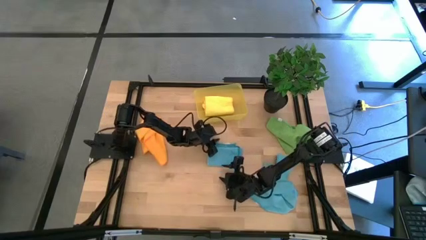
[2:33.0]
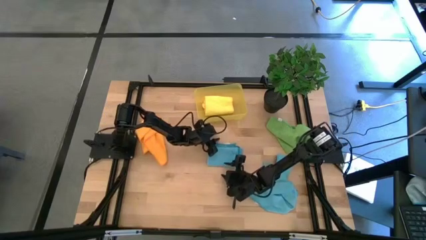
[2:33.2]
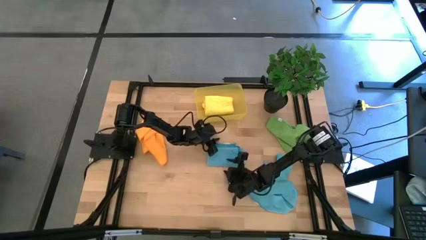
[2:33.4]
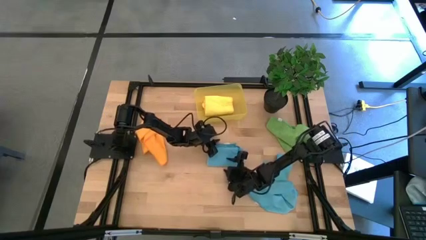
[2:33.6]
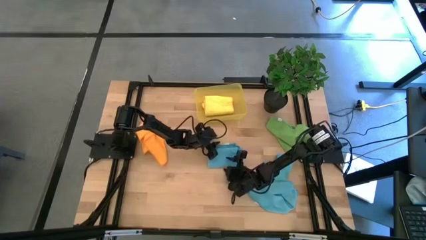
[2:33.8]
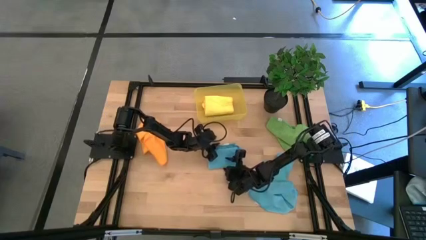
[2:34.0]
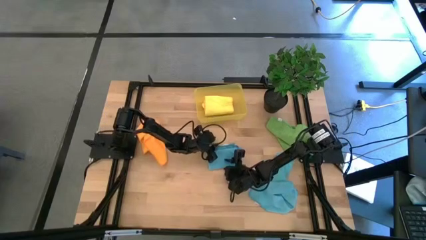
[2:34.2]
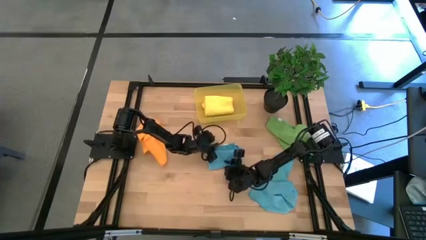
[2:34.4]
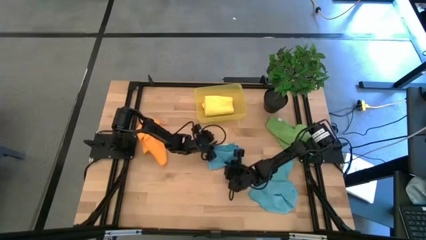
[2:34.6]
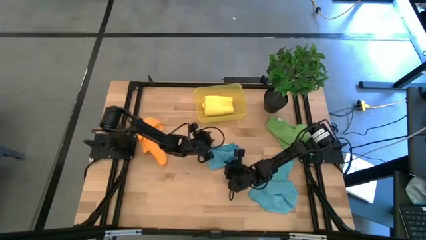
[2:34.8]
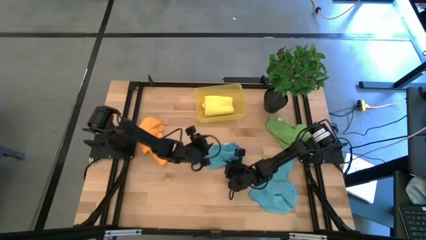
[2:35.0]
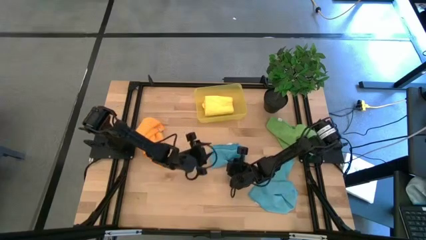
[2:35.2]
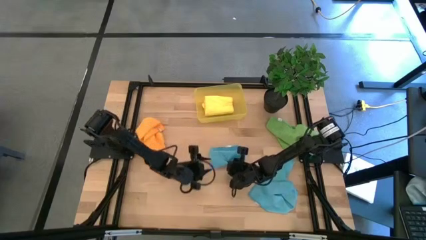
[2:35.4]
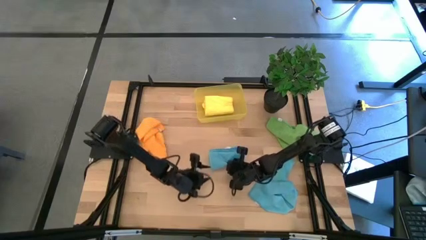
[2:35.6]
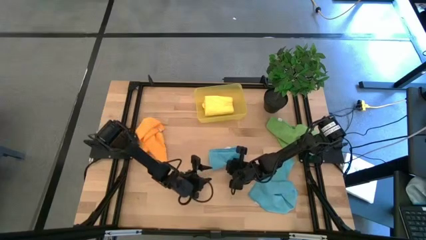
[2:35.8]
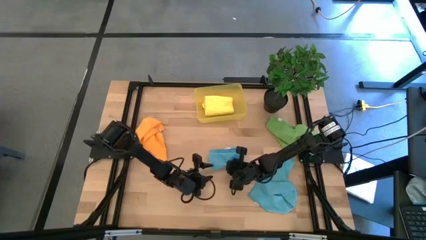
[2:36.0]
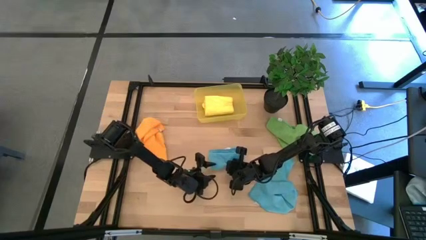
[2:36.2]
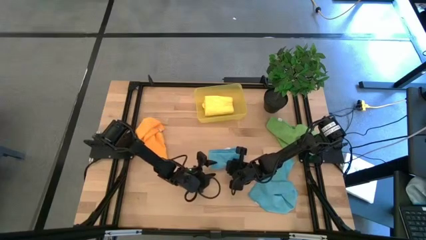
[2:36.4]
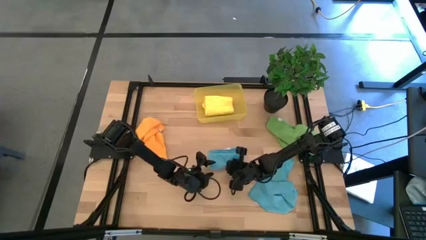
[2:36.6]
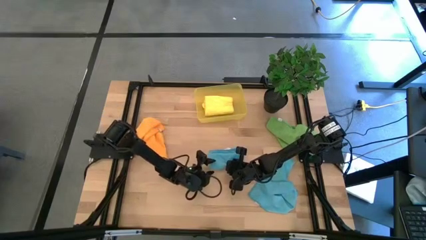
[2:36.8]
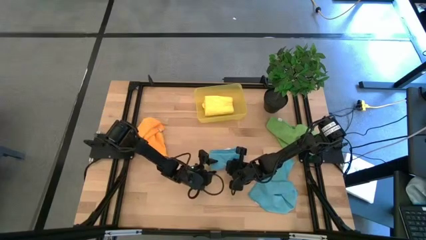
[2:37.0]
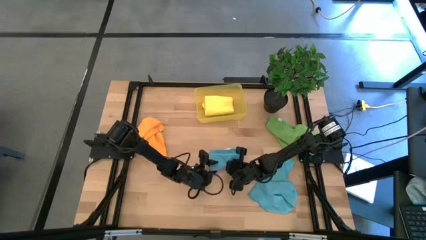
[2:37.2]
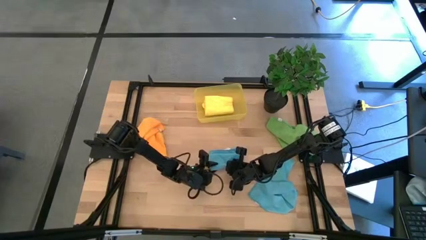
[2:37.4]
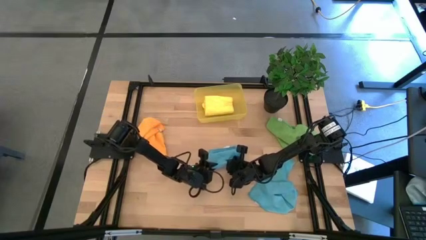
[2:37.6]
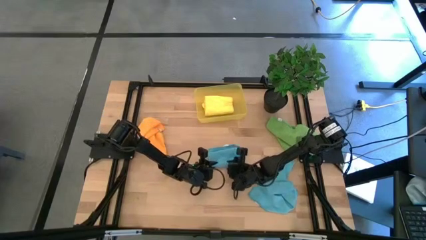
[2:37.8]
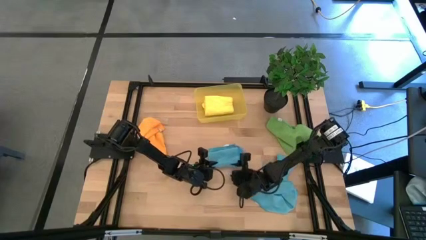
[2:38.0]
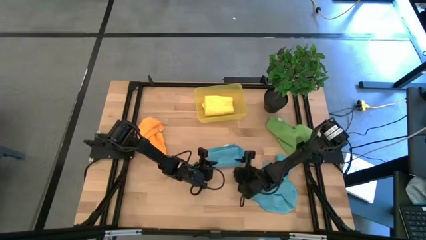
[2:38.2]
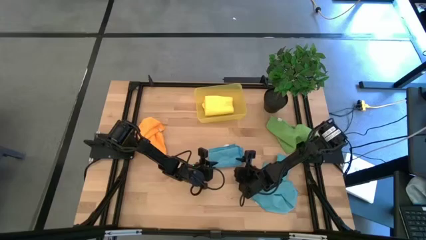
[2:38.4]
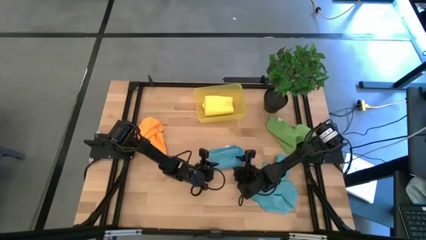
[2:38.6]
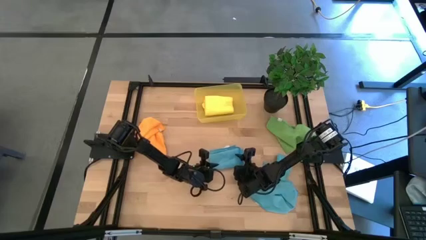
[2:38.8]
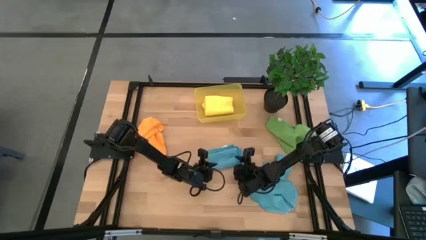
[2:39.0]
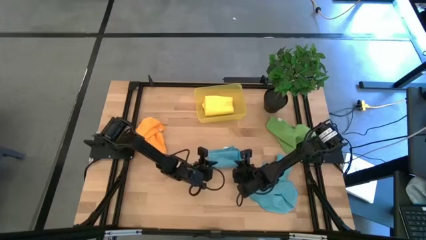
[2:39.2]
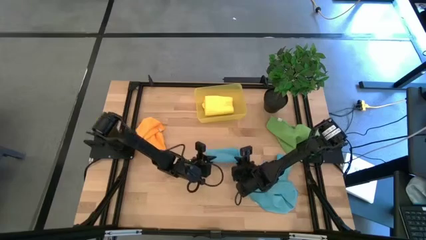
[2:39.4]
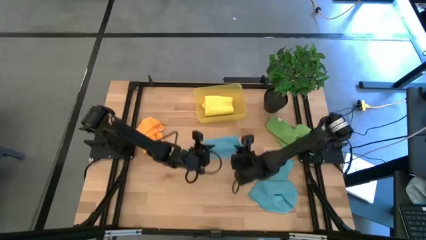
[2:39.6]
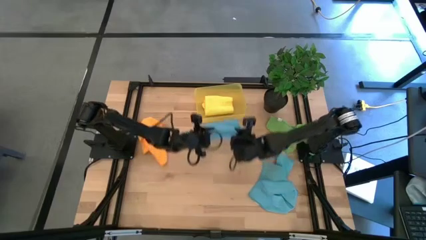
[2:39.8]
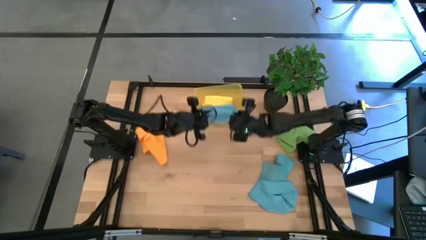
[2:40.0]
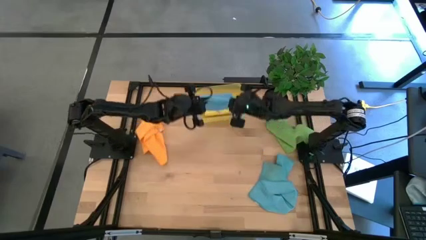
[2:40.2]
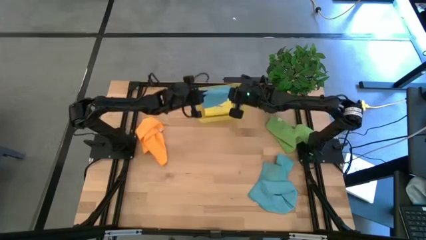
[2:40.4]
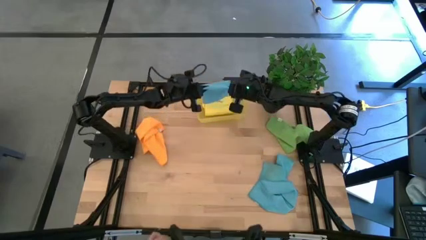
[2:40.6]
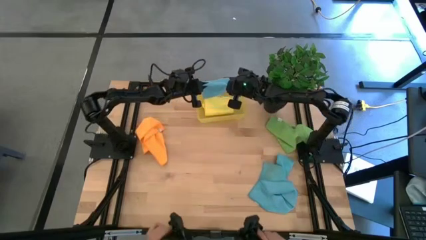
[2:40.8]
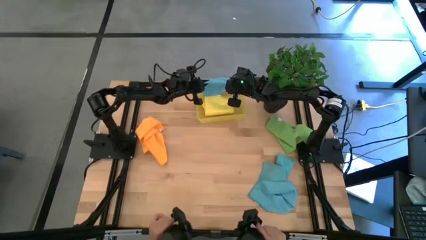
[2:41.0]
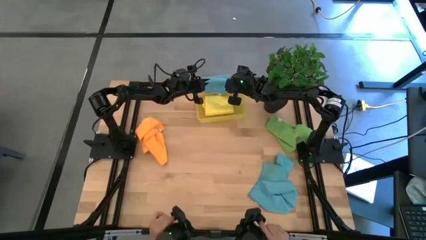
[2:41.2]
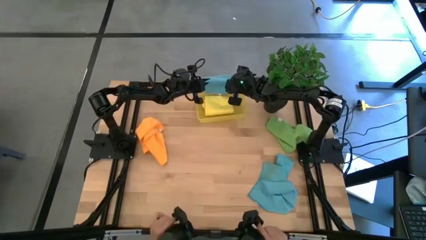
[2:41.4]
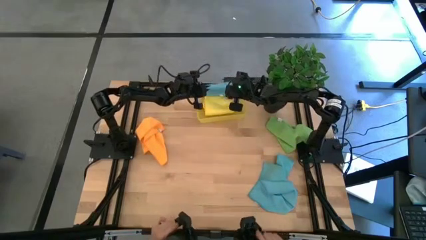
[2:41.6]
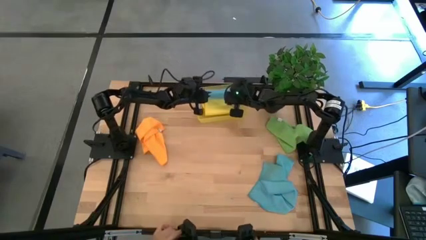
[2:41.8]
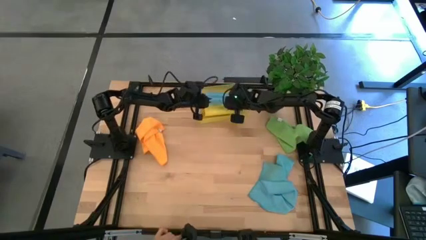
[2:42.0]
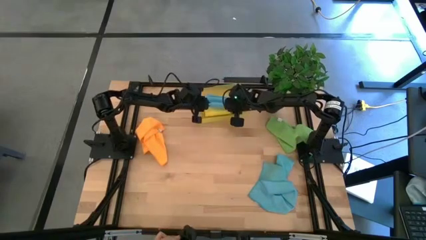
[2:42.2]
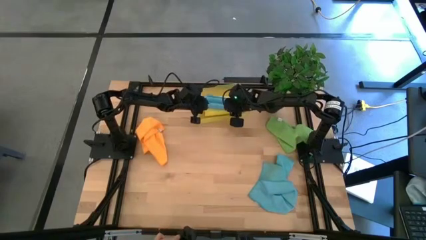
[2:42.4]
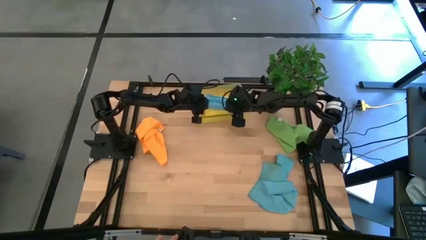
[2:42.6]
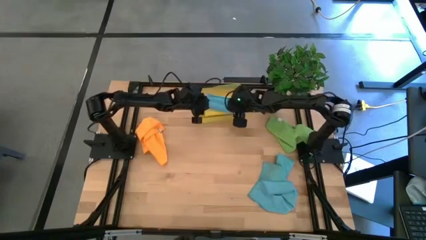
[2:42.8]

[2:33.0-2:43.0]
Task: Fold microfiber towels
Stack the left folded blue microfiber towel on top of the yellow microfiber towel in the bin

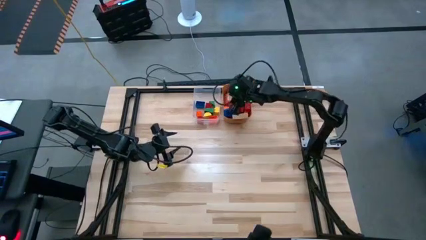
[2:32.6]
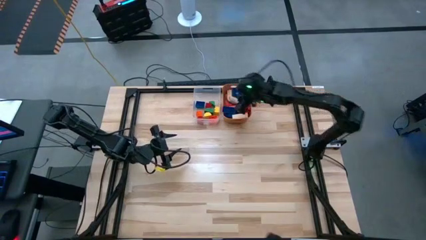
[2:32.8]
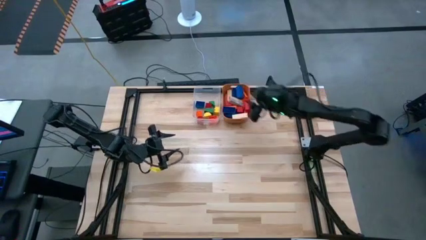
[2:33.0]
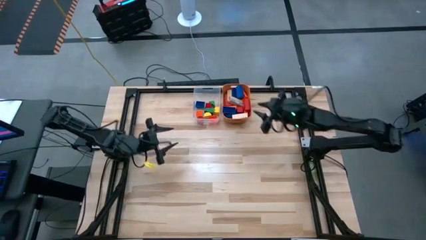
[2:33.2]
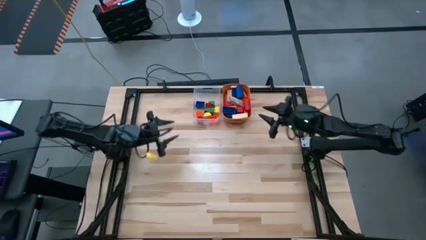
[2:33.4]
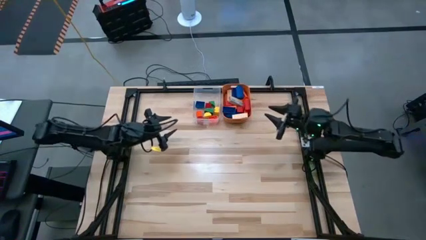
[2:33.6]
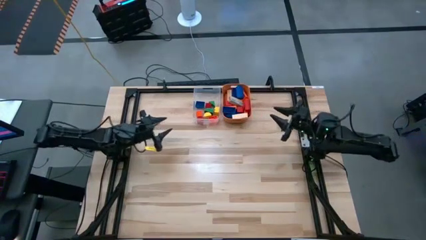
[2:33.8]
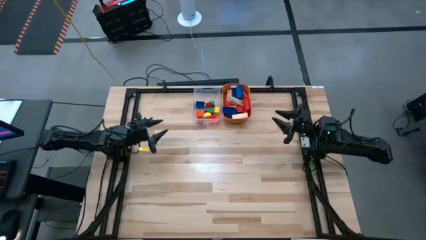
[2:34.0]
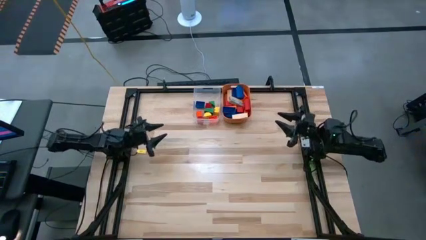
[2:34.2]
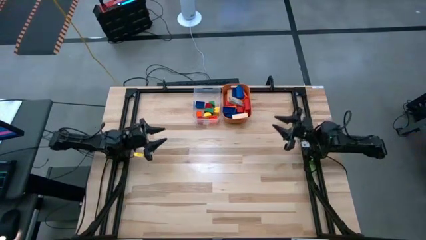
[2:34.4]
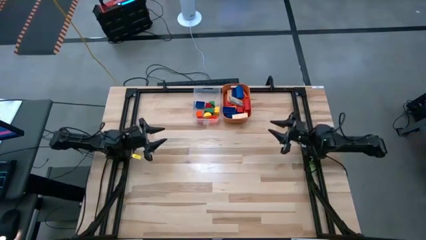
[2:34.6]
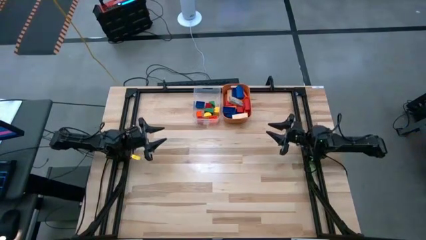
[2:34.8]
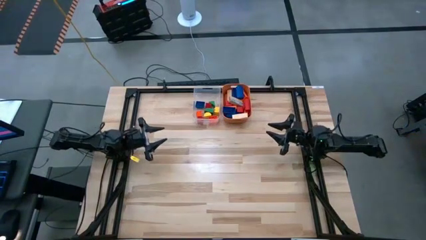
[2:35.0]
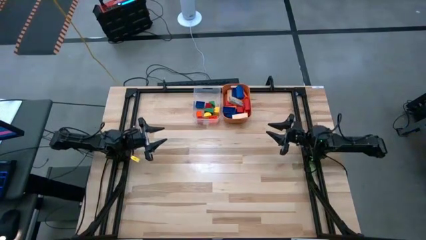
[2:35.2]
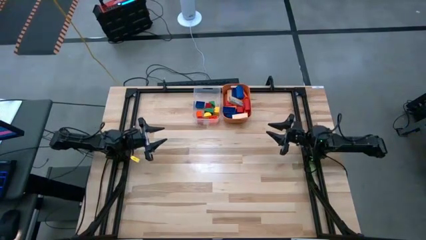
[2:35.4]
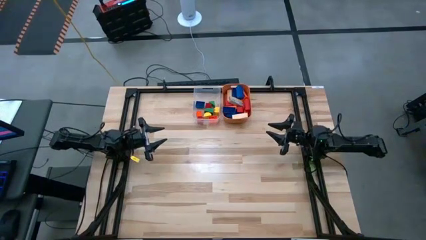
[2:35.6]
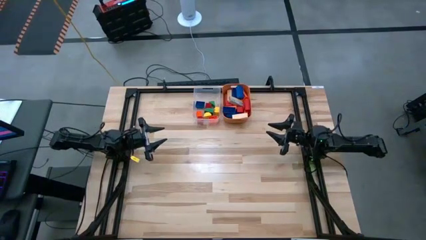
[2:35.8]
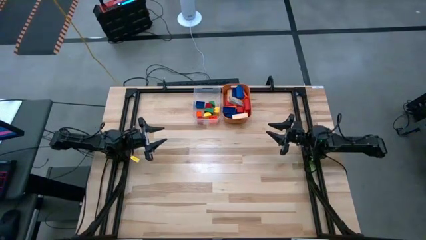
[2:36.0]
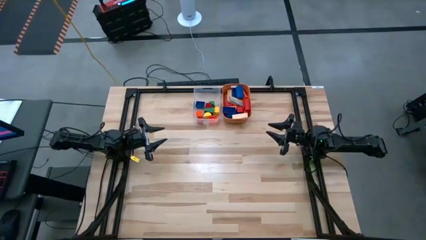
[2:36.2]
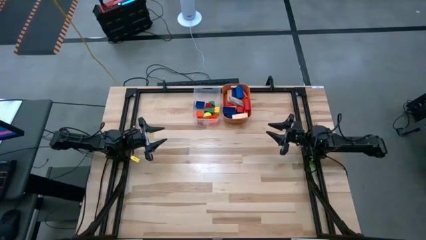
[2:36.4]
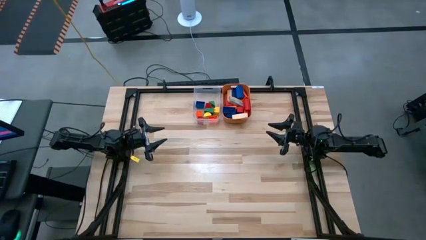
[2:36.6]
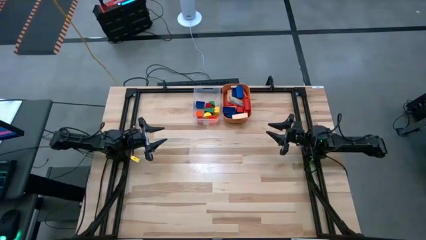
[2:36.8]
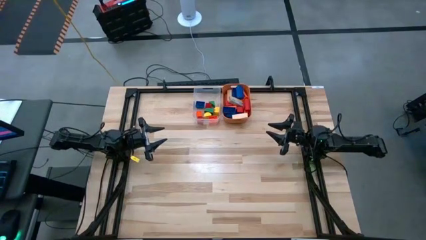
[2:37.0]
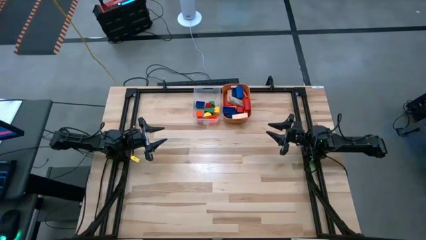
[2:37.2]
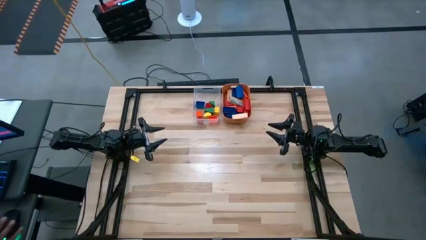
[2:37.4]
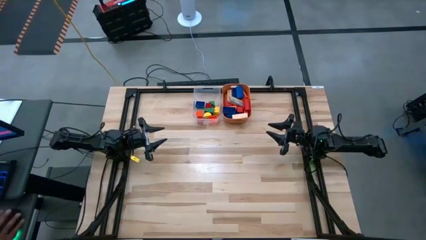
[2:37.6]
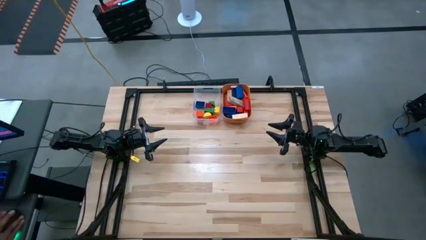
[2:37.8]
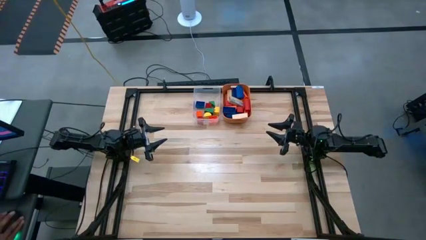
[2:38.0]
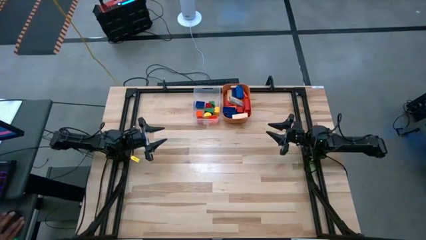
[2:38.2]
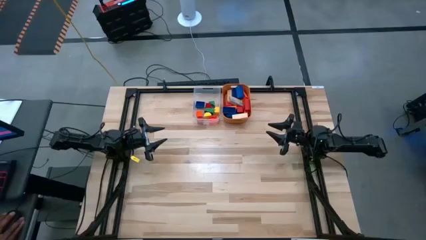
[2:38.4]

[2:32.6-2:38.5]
Task: Sort blocks by size
Return to Home Position
